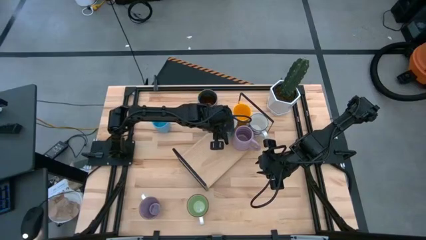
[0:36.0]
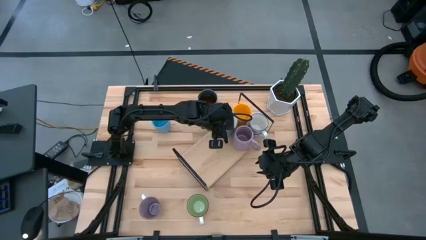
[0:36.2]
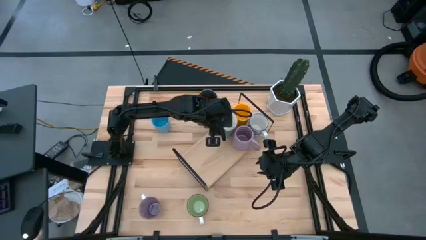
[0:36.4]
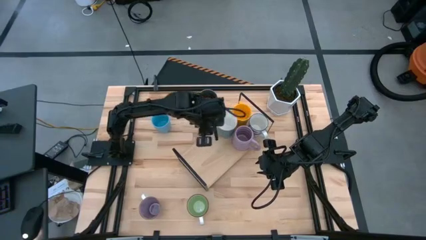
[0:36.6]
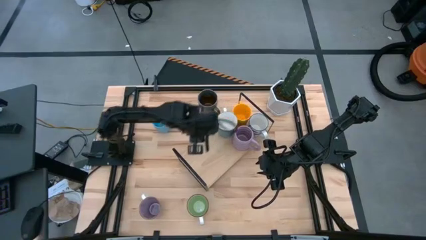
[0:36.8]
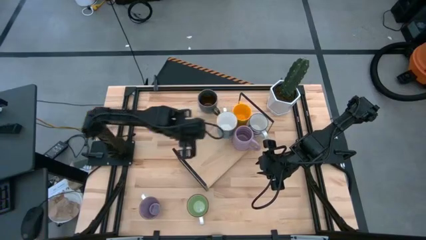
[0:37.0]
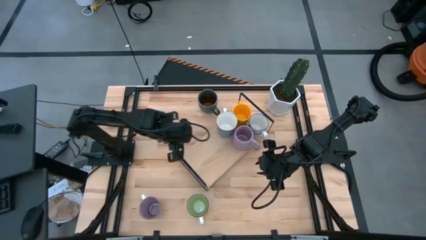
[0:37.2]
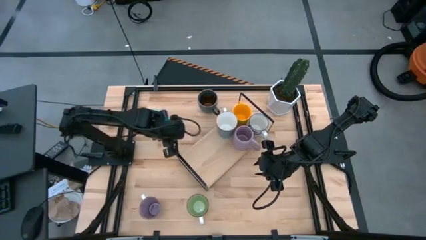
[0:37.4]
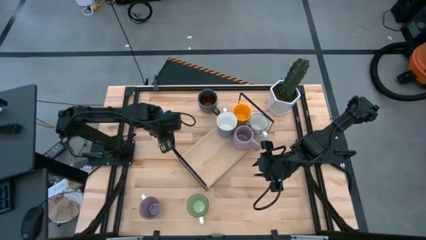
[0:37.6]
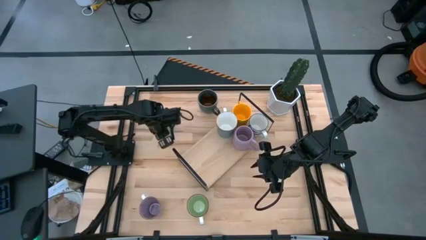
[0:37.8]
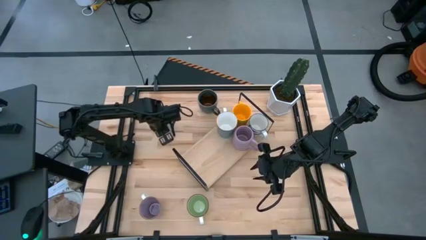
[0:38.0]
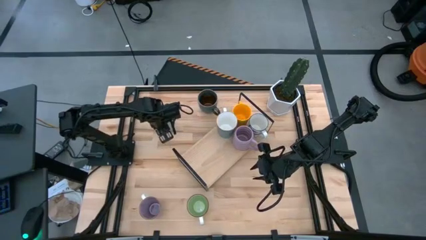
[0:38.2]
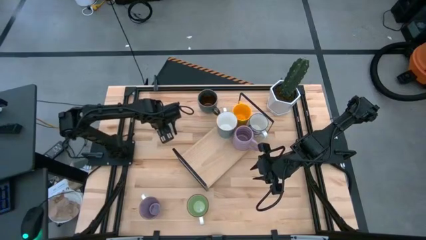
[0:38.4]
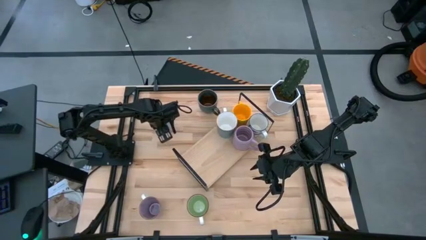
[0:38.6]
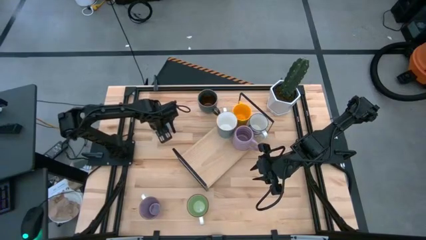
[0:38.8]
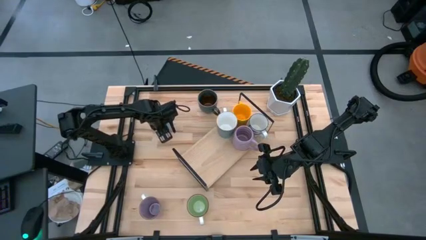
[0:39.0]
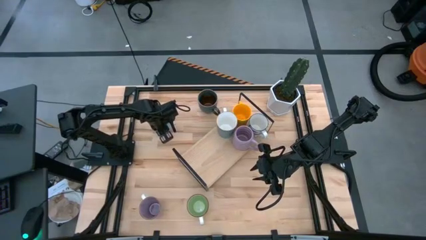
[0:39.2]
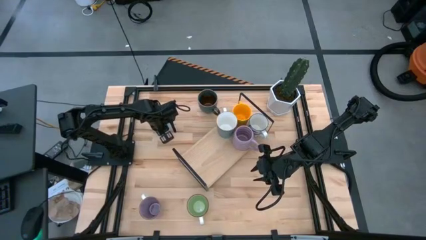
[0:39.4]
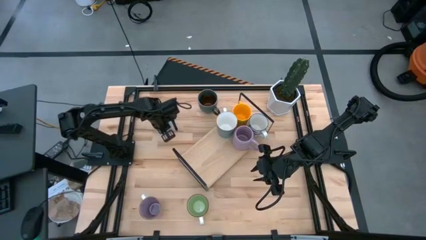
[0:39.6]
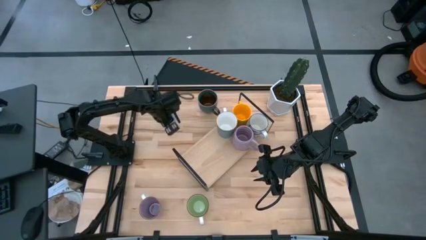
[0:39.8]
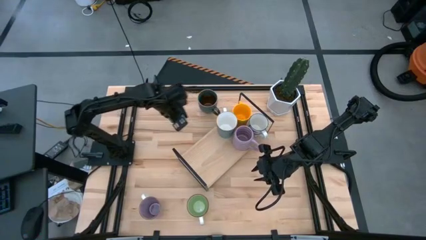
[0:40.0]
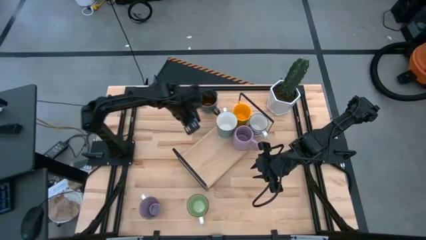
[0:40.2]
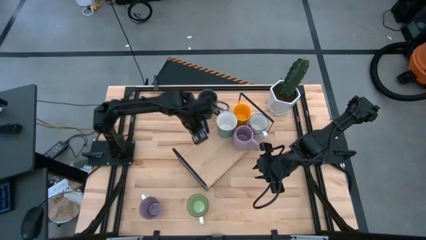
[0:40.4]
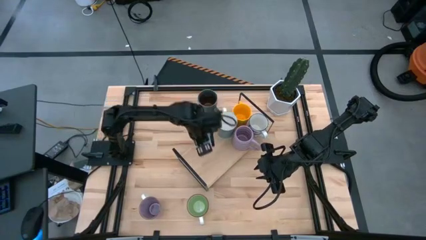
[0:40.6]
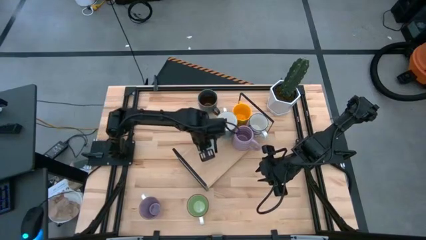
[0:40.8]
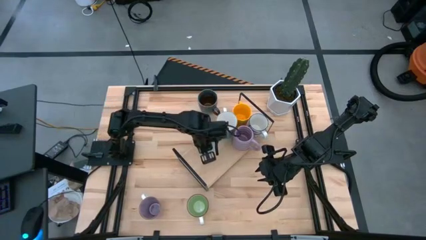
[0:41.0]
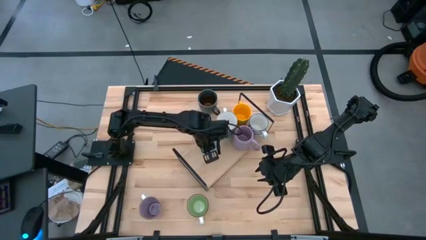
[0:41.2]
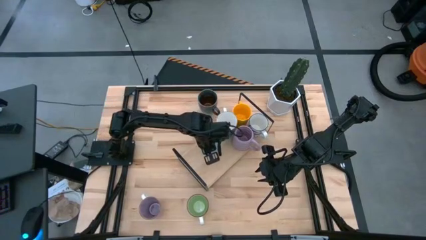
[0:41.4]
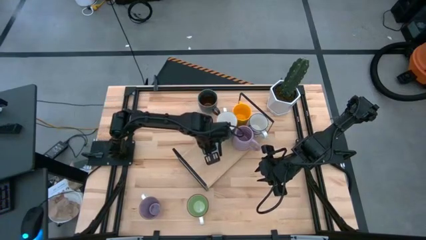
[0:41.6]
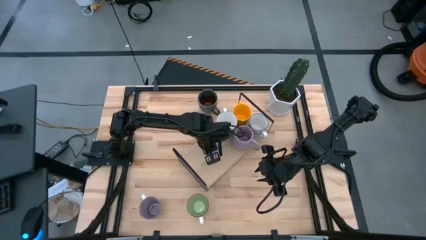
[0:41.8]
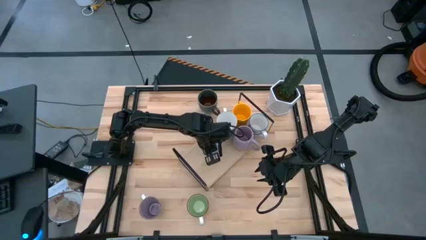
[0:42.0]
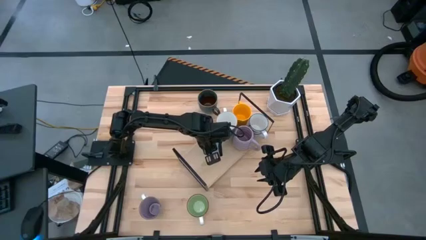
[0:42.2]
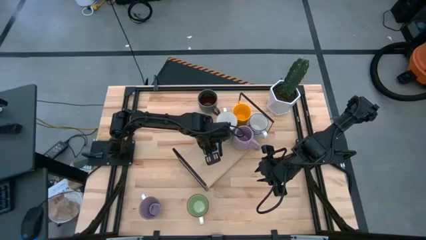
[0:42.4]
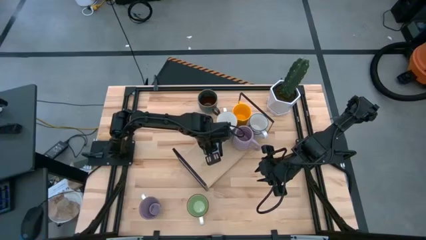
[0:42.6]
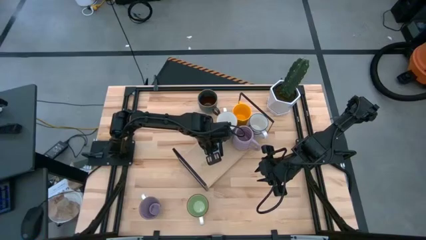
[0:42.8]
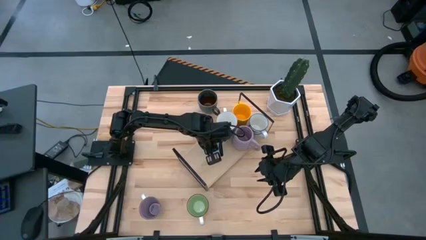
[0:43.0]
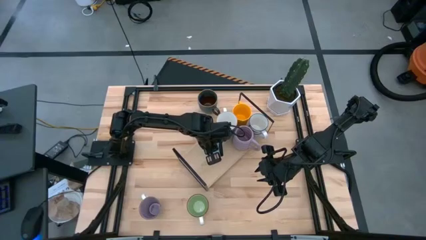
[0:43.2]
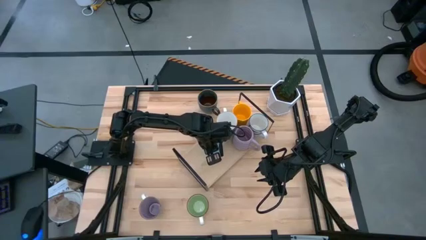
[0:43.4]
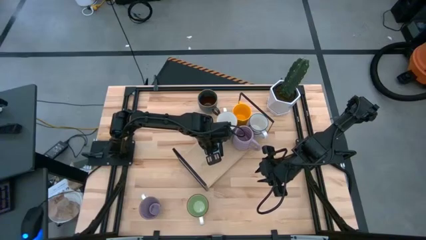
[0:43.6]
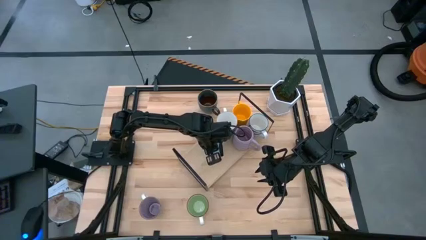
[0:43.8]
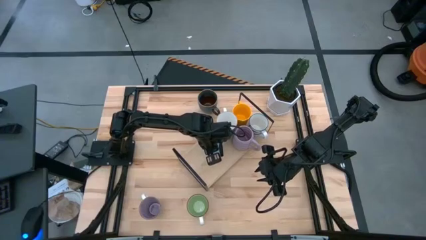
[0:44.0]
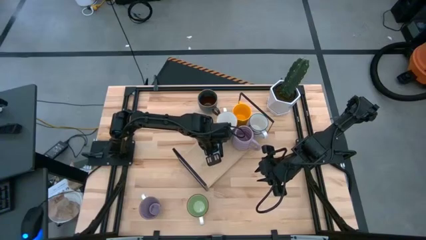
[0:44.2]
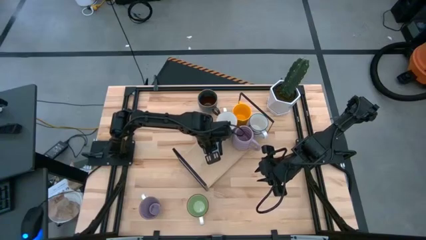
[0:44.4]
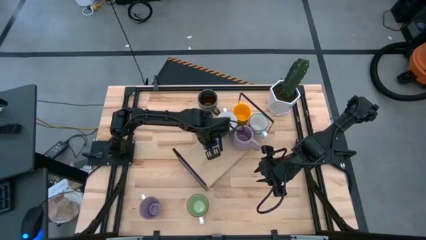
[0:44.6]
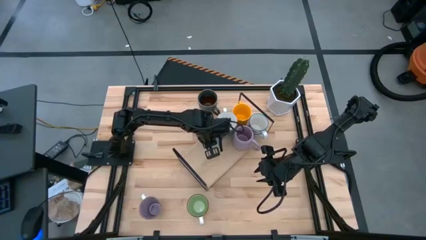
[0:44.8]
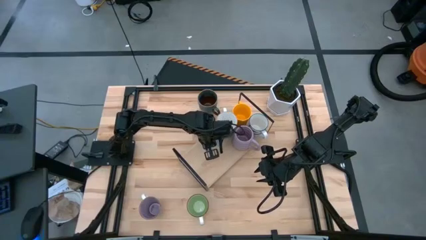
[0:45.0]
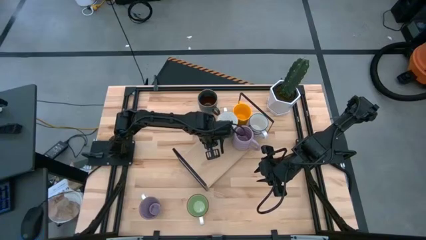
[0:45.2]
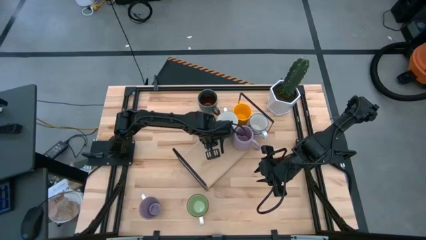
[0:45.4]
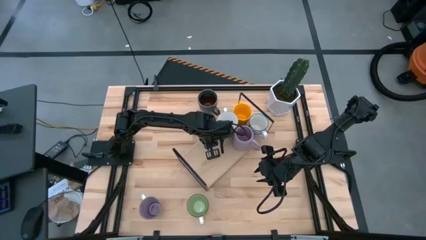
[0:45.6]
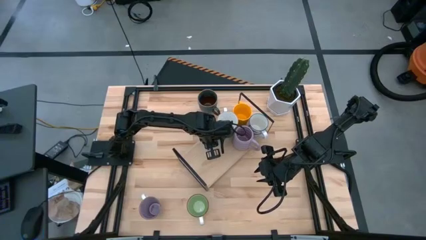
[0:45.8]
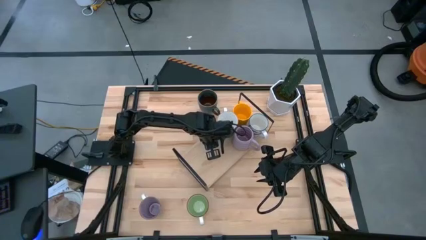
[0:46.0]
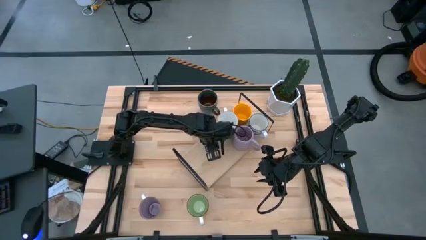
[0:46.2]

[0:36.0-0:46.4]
Task: Place coffee mugs
Put the blue mug on the shelf

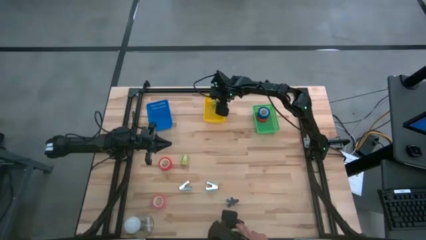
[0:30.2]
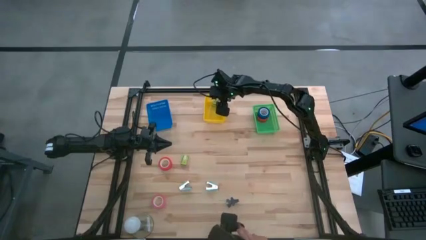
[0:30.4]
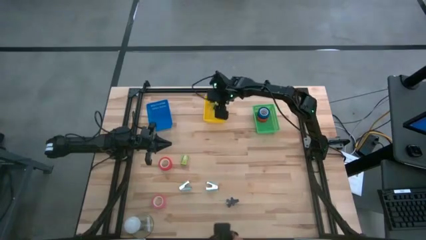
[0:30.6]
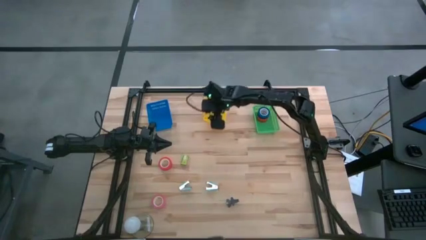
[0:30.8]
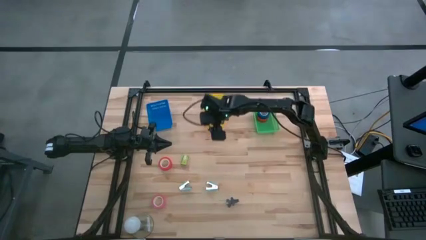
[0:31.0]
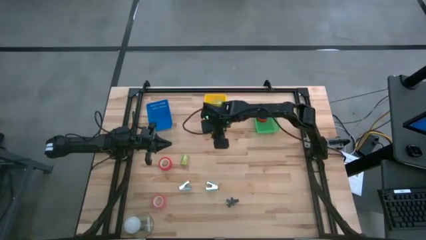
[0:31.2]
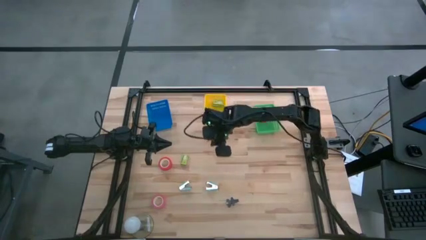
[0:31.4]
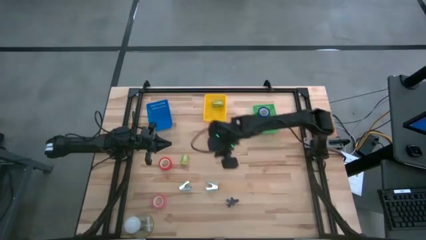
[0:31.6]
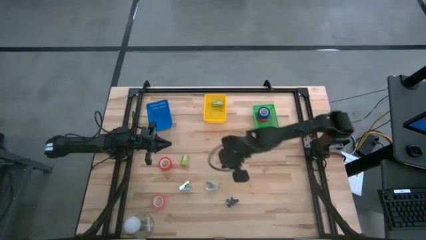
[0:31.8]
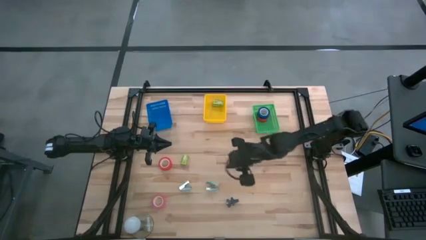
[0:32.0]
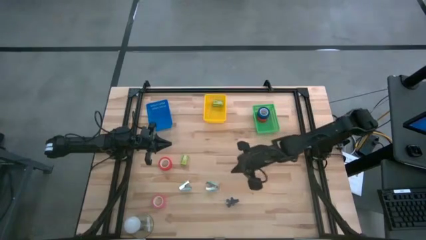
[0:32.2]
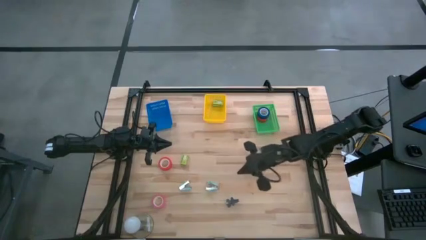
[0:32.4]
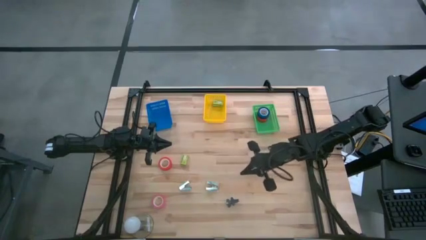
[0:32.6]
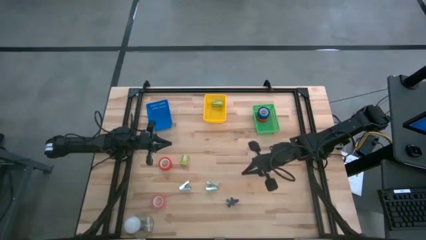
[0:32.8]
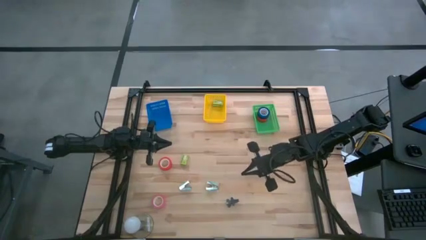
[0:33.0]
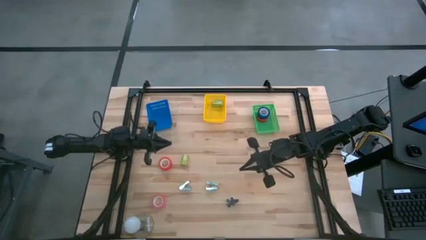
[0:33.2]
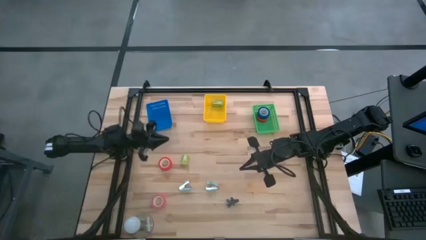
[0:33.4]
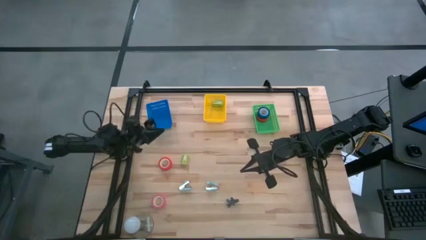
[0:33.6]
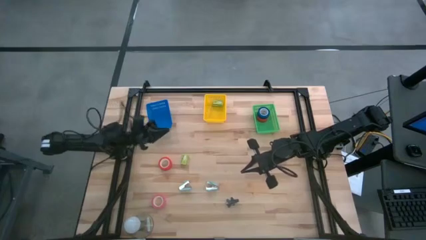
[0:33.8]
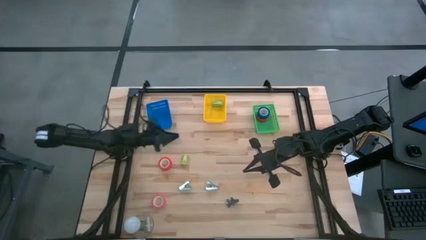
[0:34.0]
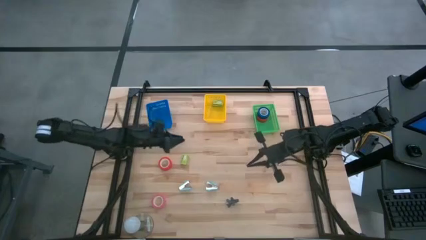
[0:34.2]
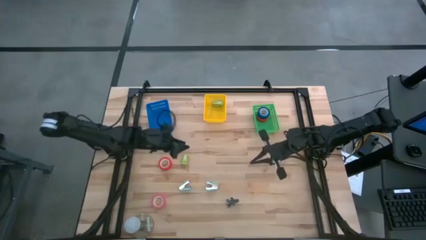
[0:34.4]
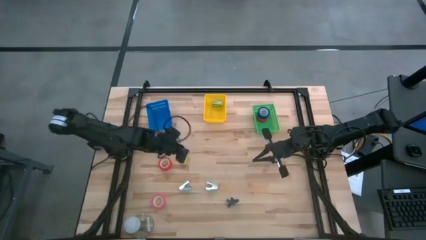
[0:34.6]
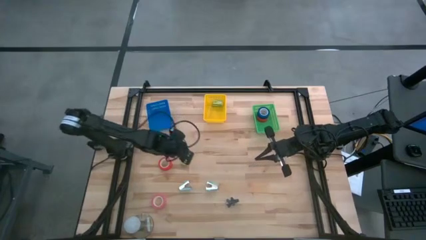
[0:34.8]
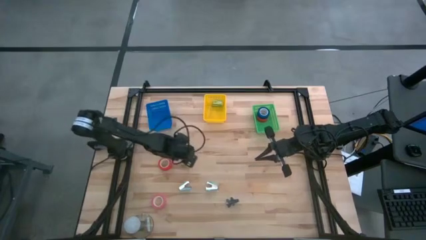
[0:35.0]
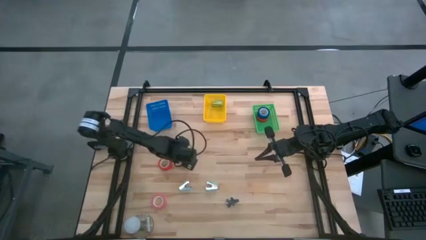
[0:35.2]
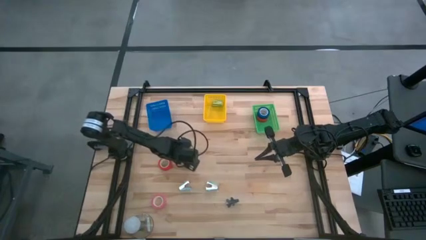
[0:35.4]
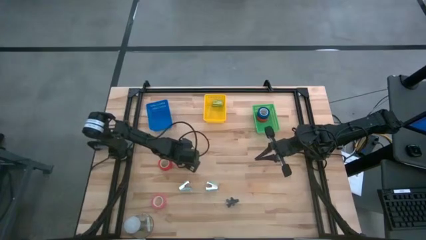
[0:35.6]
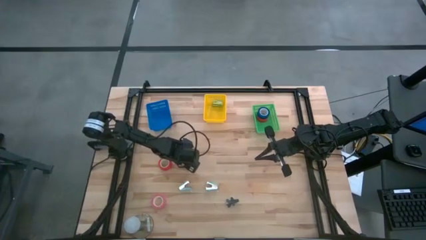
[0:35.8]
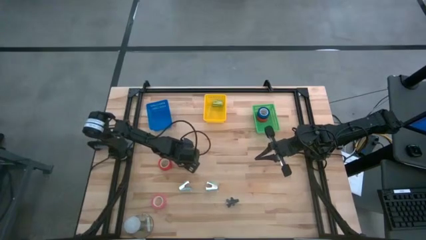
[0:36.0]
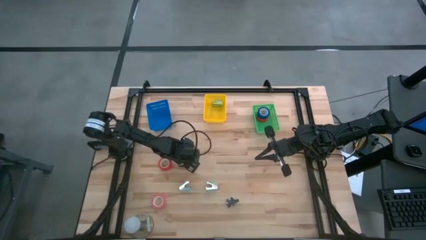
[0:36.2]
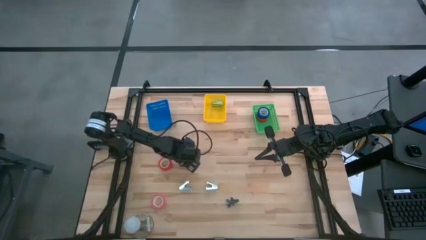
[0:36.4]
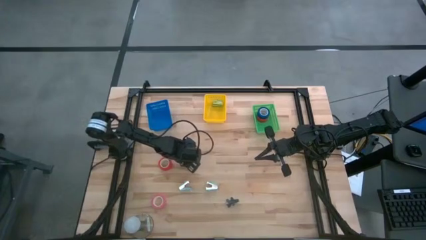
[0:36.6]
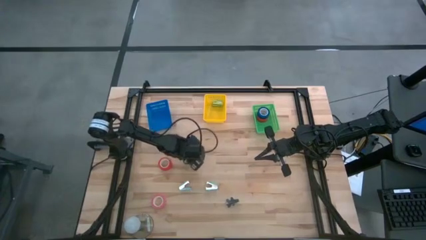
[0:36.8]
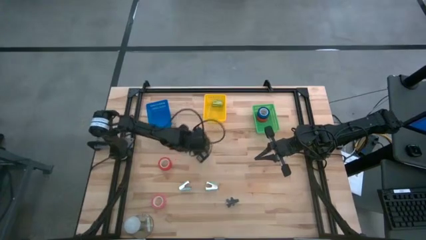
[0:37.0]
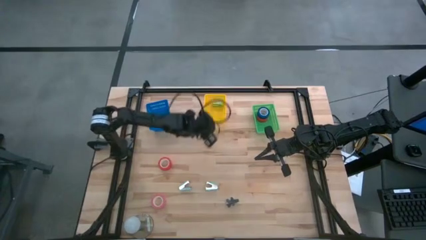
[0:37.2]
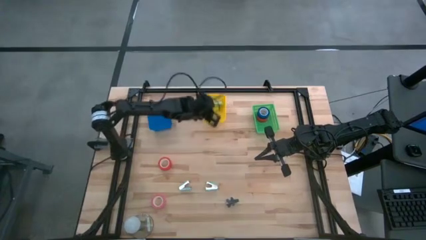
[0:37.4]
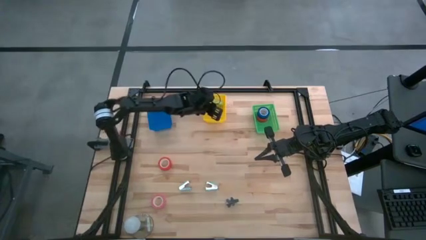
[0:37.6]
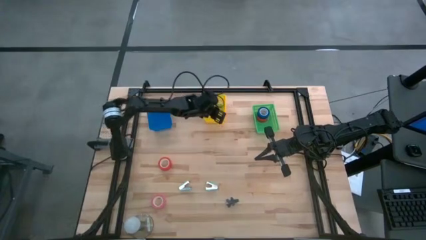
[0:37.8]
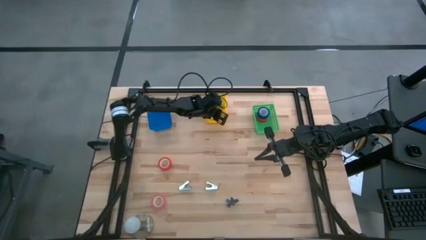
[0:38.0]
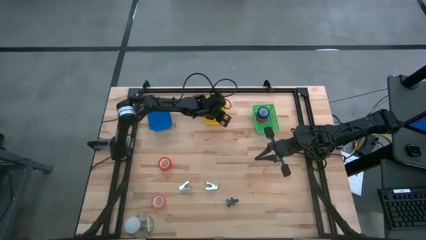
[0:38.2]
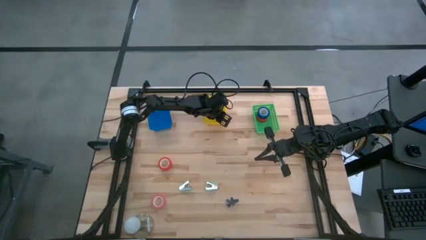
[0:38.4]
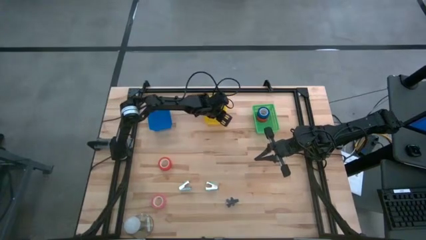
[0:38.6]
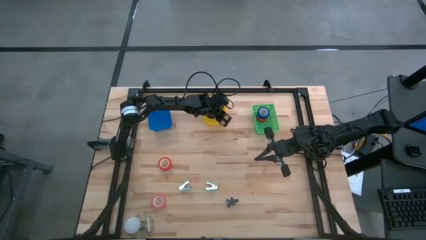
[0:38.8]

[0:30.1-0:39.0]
Task: Pick and place Stapler, Stapler remover, tape
Put the staple box into the yellow bin
